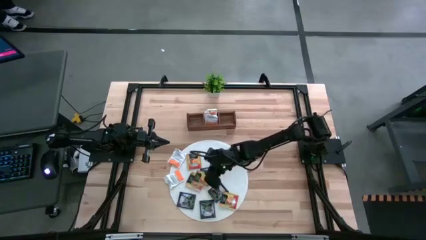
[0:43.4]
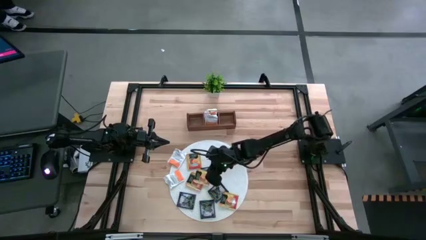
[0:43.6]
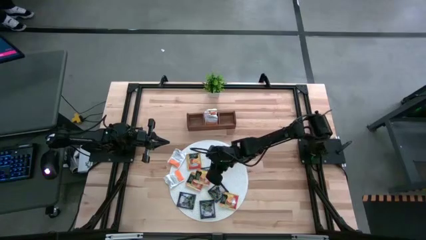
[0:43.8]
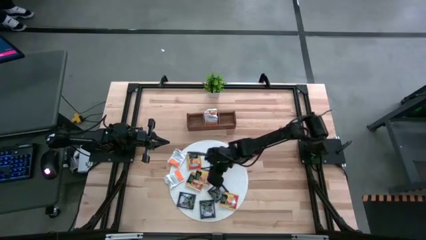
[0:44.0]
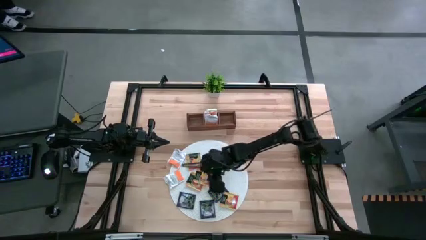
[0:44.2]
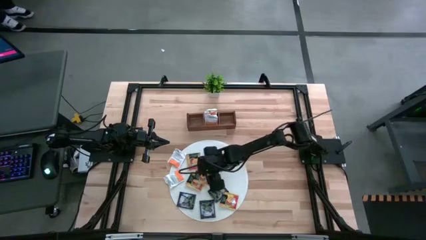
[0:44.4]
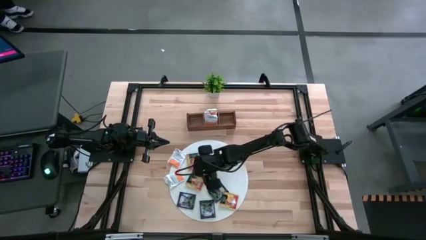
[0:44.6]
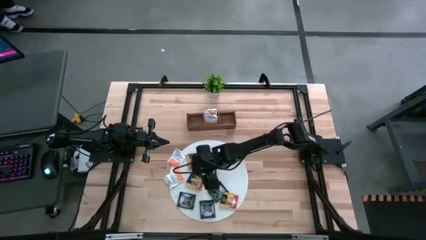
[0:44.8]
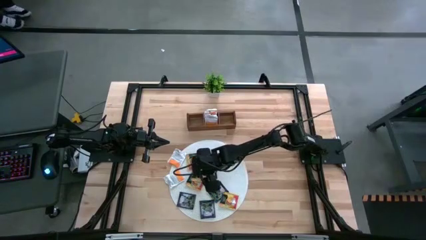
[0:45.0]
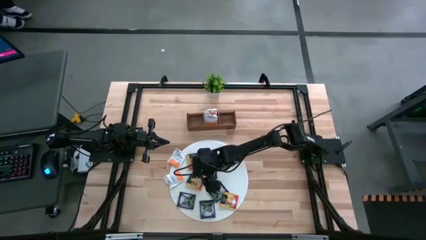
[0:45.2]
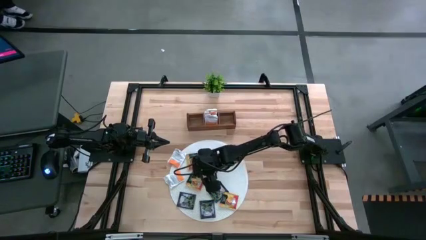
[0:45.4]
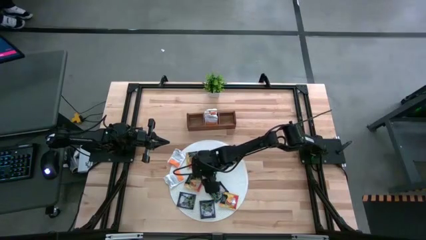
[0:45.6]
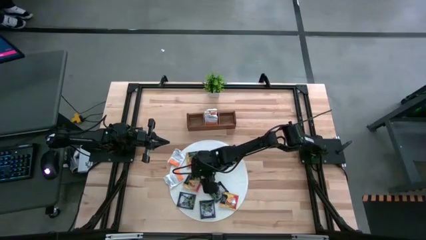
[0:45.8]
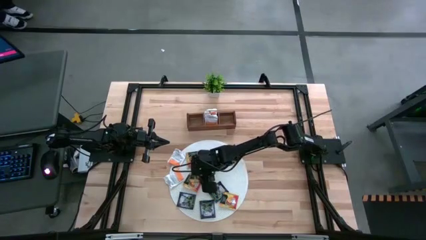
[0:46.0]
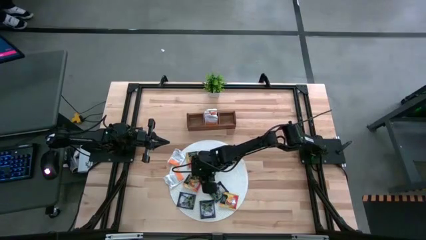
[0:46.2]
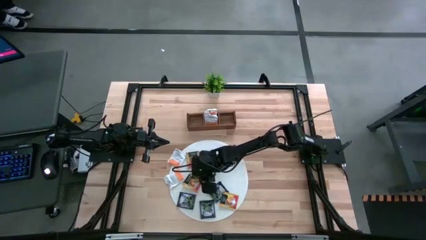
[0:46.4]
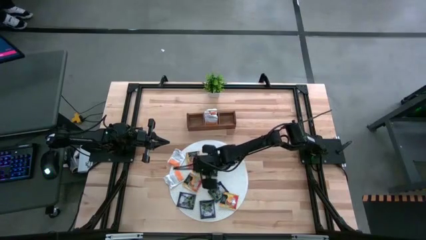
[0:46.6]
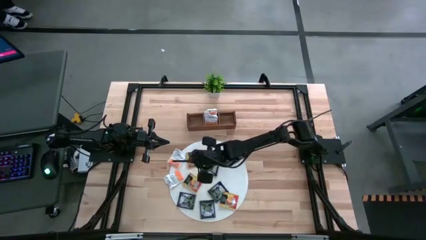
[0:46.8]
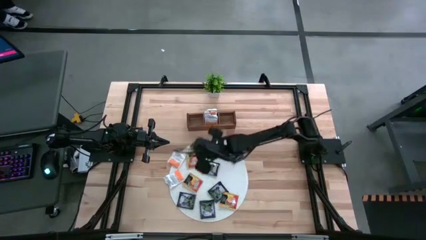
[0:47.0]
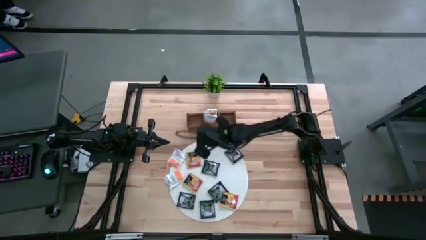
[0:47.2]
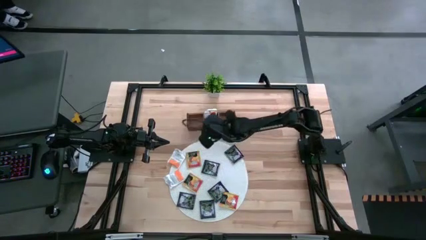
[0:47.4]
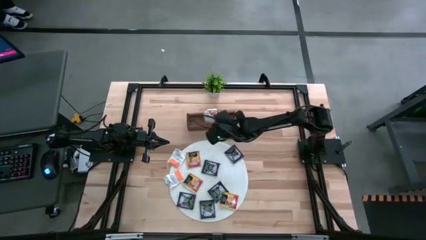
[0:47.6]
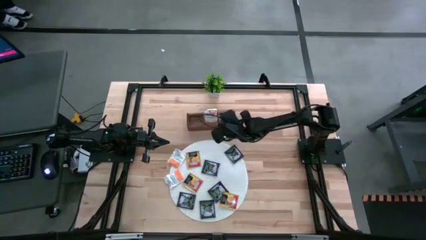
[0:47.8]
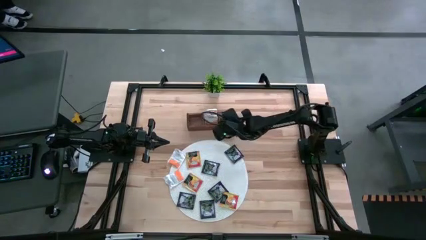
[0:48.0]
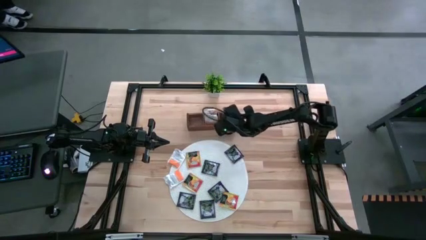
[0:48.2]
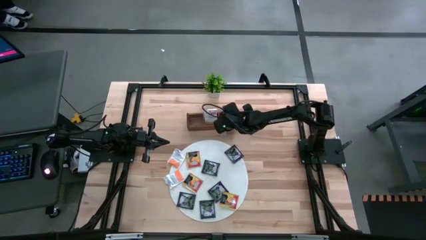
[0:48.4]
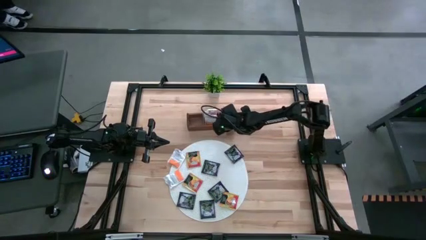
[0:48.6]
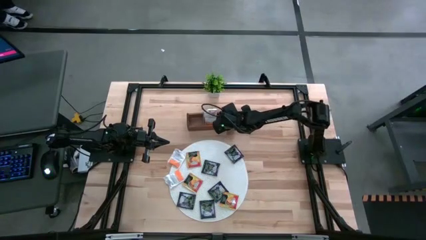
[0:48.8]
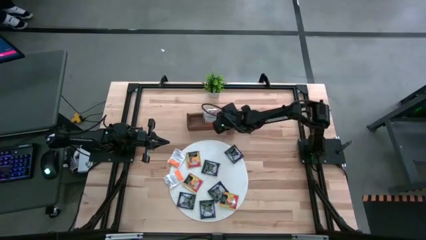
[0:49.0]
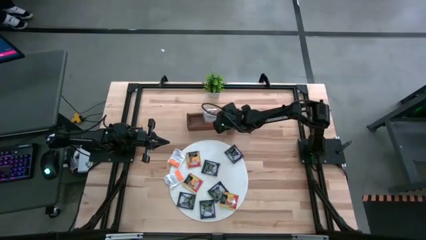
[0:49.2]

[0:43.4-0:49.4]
Task: Pick & Place Tea
Put the yellow tea bag into the right section of the wooden organizer

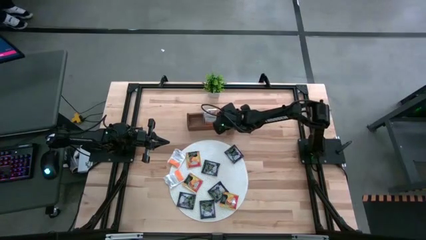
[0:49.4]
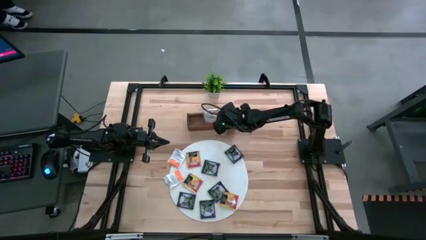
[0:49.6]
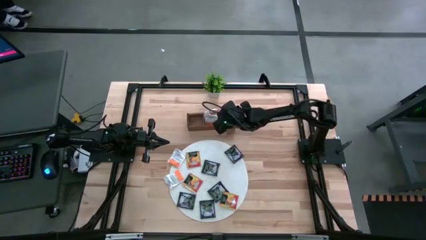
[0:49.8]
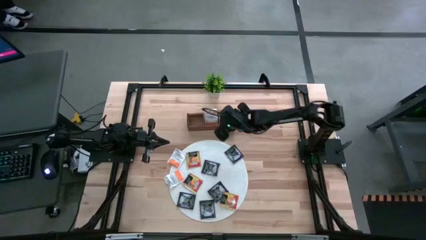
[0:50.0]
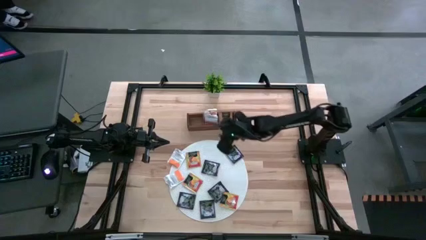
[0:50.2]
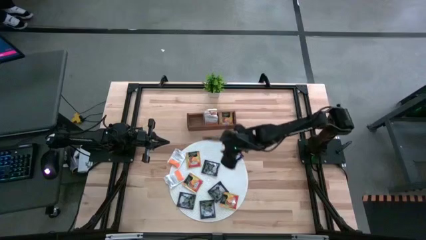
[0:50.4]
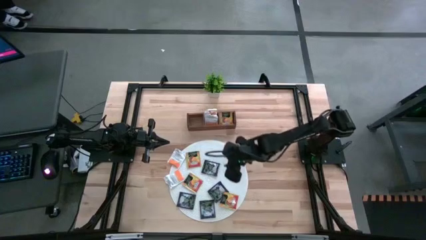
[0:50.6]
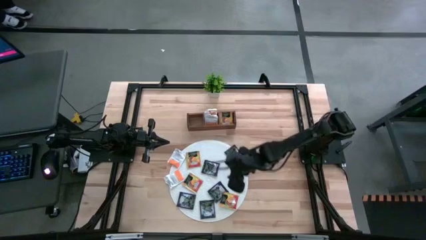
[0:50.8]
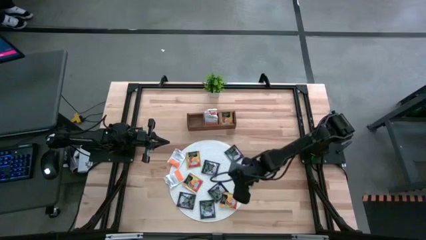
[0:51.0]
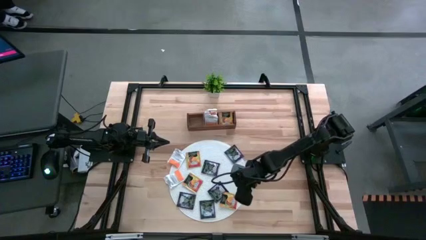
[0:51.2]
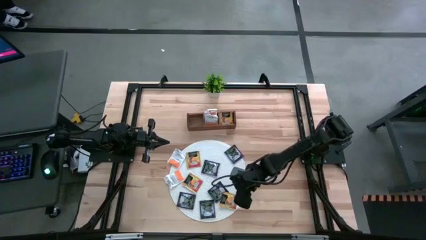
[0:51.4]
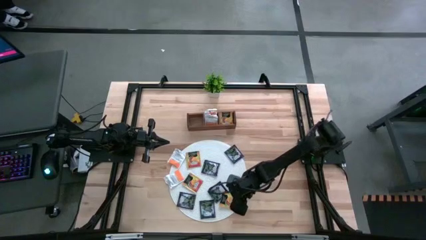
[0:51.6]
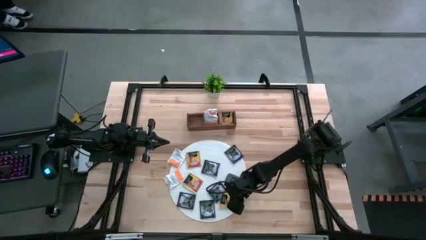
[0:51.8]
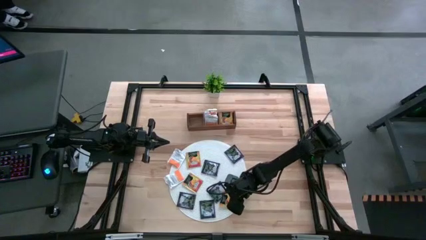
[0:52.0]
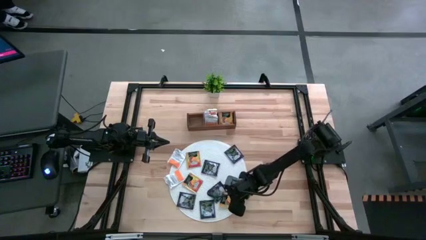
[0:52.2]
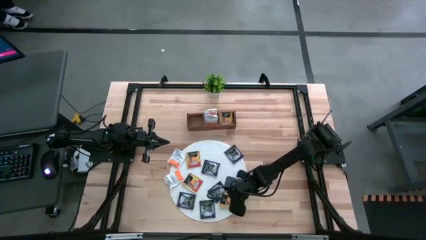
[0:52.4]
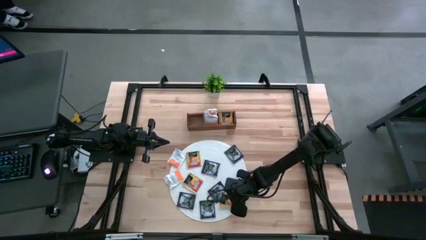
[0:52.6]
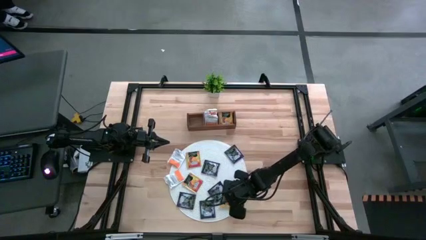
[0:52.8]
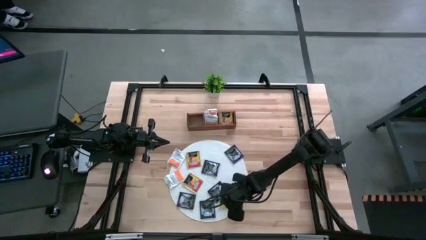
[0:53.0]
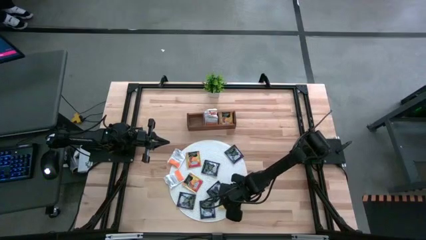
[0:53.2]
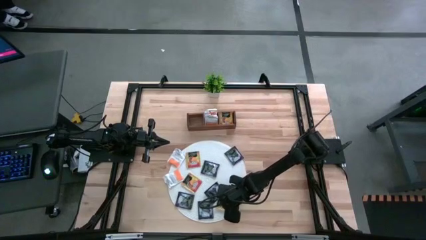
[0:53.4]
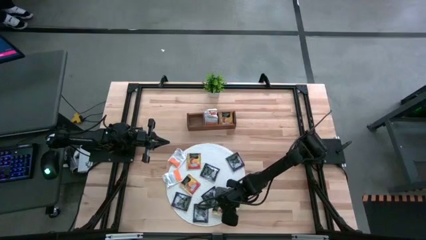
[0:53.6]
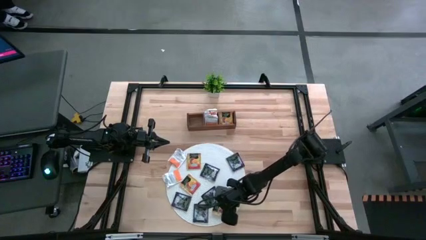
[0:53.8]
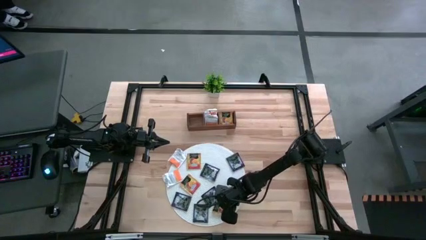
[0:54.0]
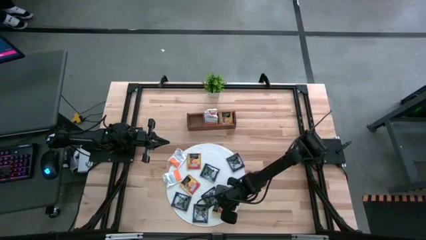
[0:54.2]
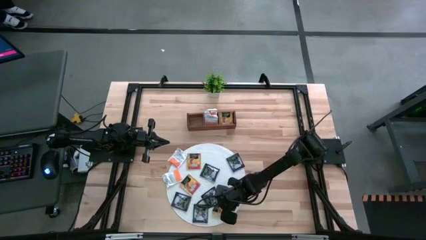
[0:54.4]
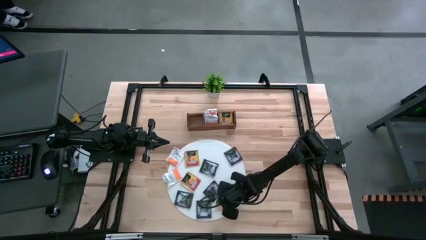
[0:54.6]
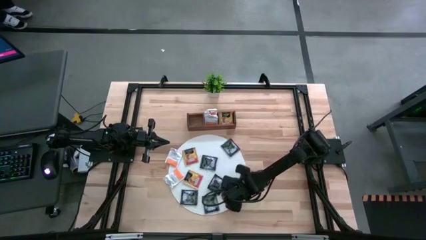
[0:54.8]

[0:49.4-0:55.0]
Put the yellow tea bag into the right section of the wooden organizer

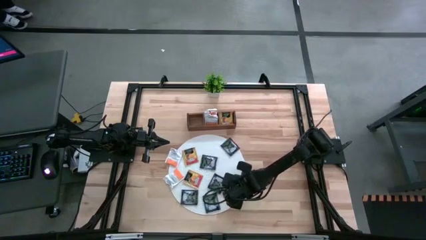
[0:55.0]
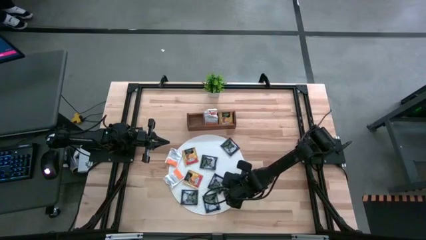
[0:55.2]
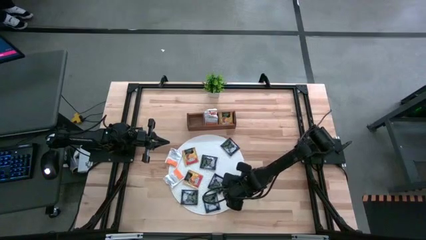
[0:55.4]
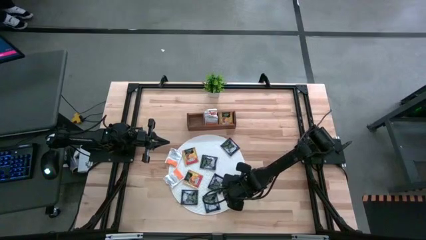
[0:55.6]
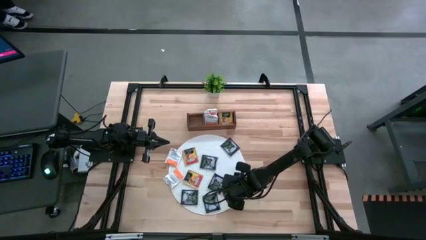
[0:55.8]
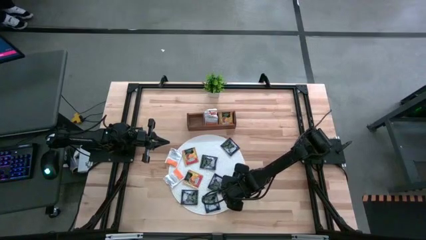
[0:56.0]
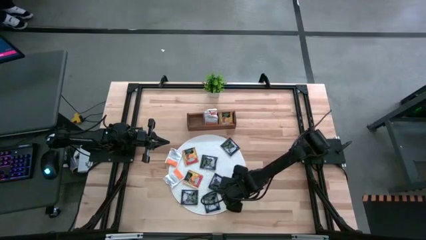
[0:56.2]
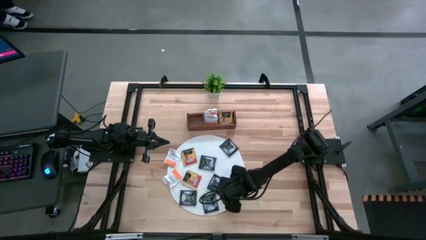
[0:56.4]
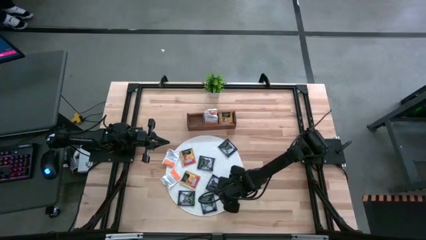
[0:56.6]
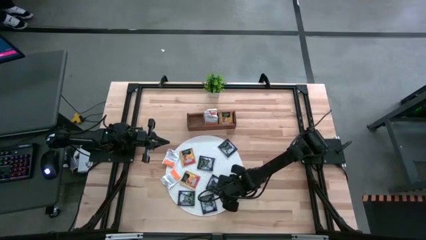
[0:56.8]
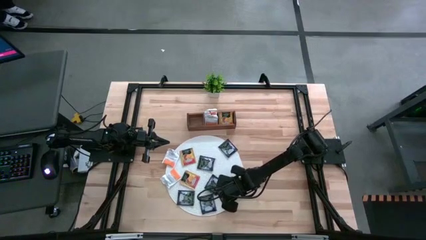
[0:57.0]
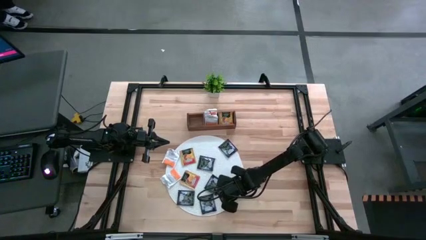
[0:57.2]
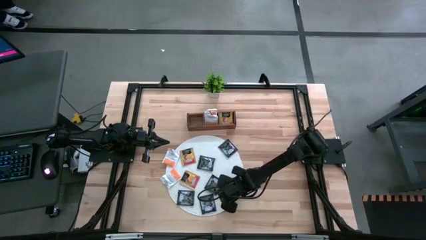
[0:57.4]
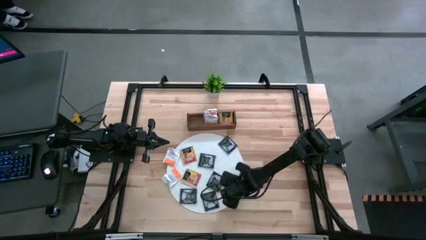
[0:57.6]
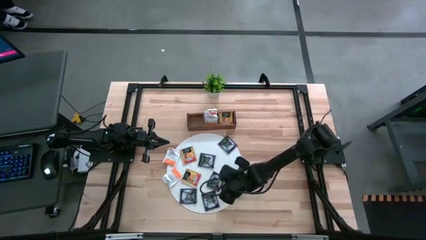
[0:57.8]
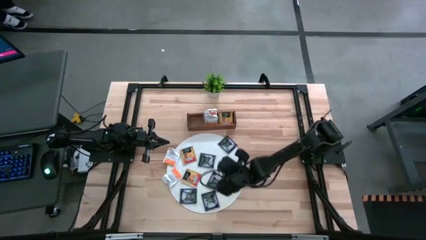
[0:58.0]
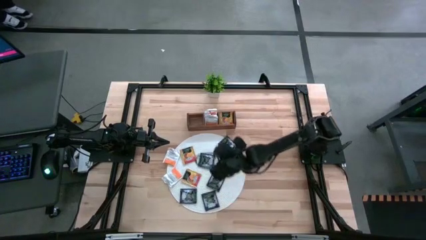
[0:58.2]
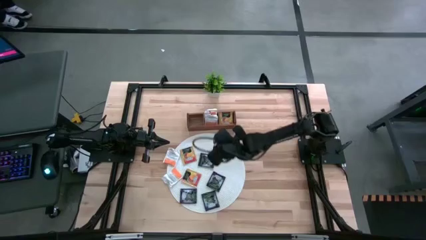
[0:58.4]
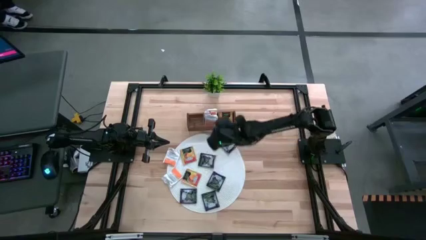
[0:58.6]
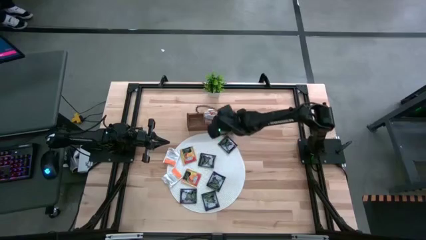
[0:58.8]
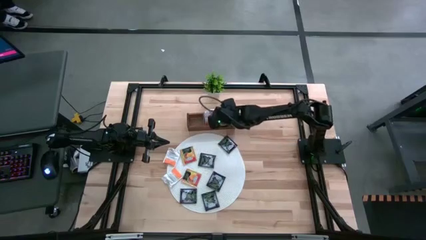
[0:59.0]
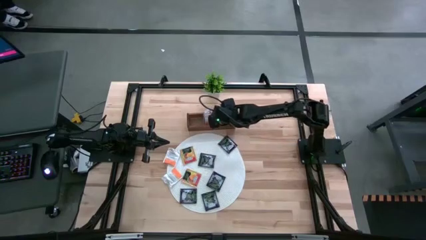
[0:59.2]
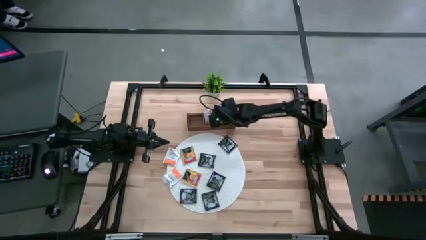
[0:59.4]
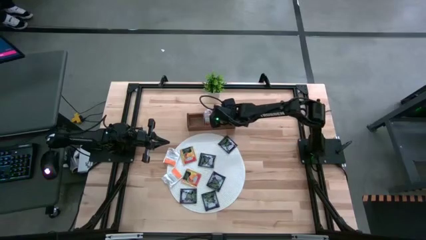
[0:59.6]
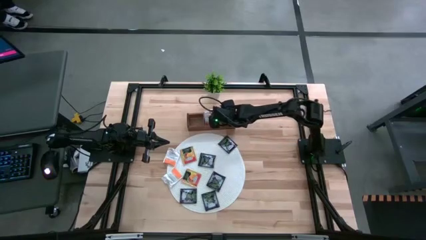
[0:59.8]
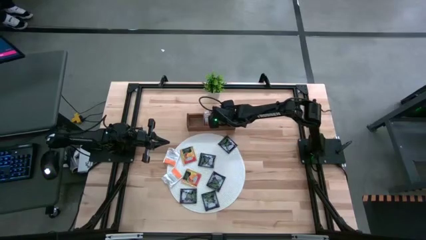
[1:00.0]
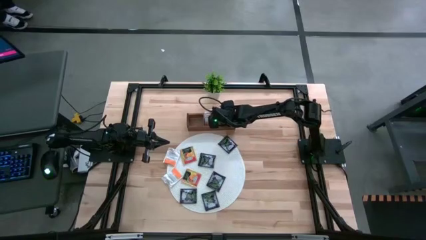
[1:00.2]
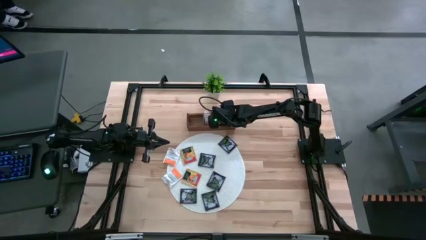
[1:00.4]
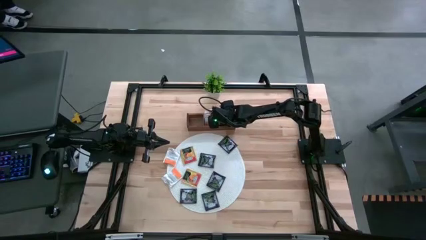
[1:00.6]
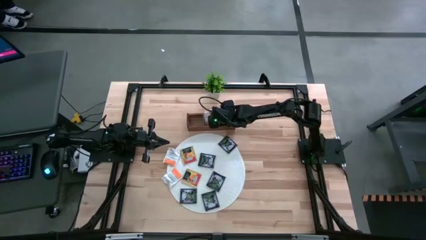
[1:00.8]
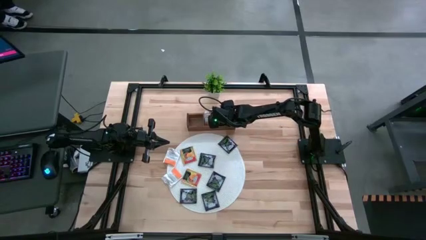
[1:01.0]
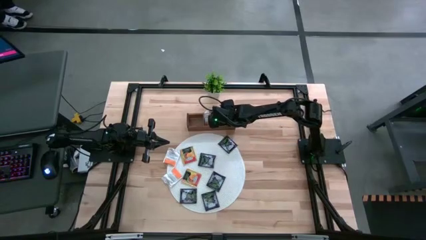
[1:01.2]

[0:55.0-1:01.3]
Put the yellow tea bag into the right section of the wooden organizer
